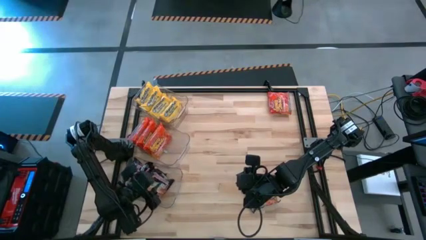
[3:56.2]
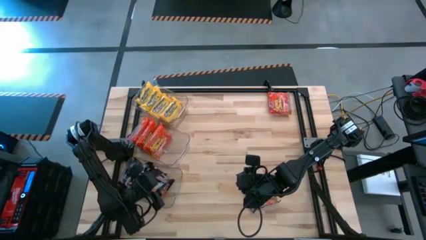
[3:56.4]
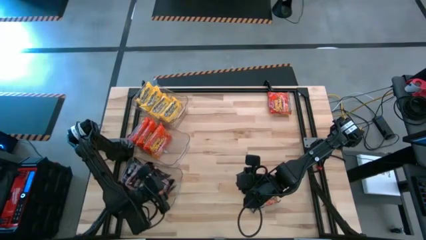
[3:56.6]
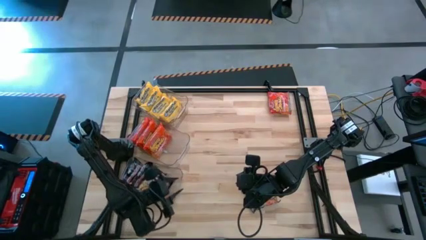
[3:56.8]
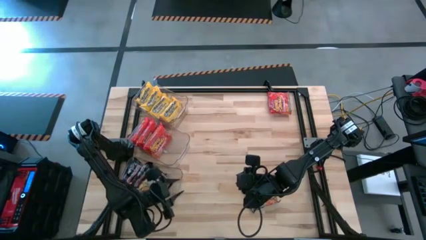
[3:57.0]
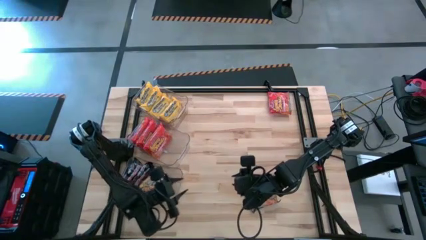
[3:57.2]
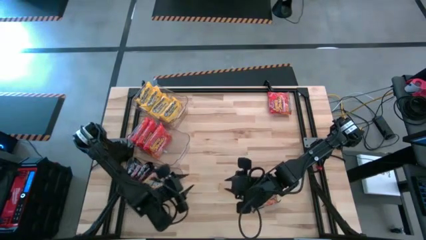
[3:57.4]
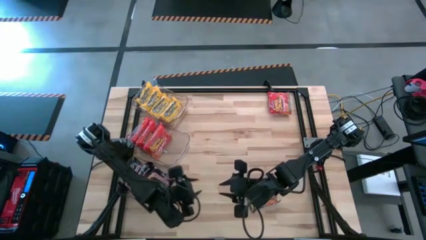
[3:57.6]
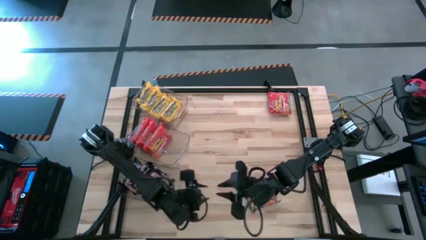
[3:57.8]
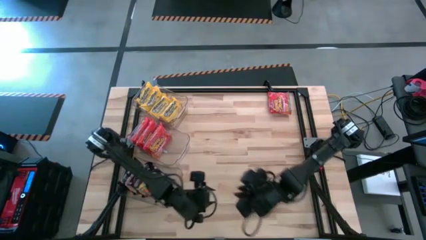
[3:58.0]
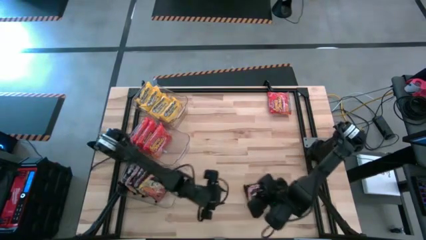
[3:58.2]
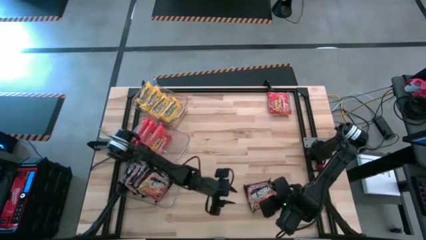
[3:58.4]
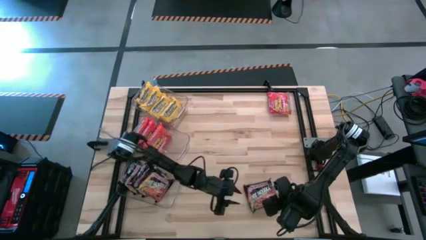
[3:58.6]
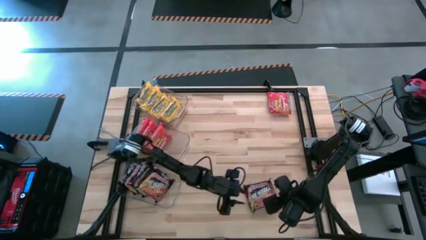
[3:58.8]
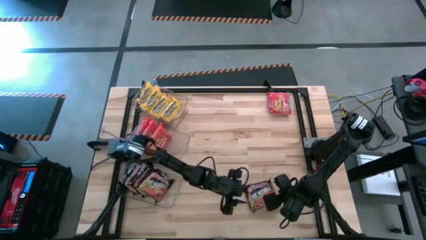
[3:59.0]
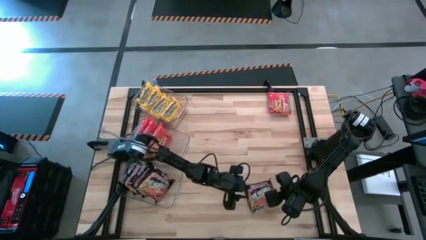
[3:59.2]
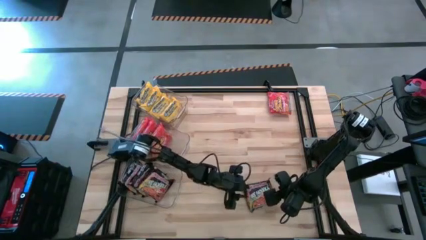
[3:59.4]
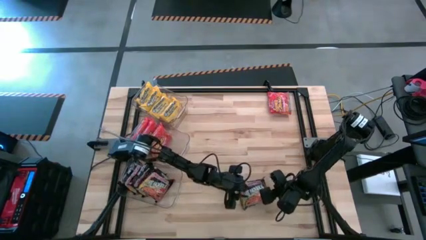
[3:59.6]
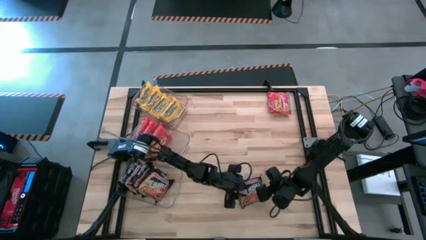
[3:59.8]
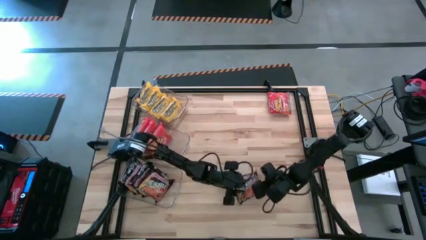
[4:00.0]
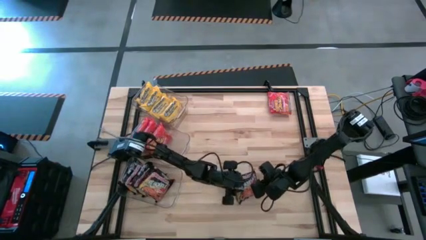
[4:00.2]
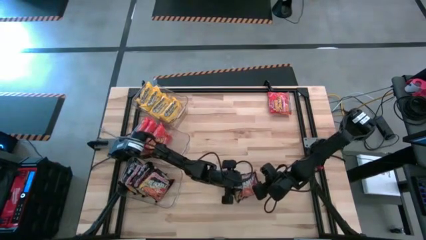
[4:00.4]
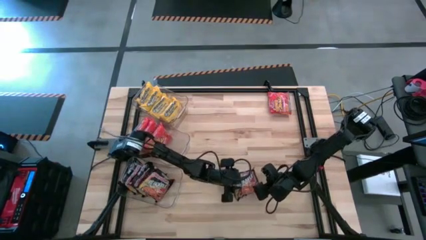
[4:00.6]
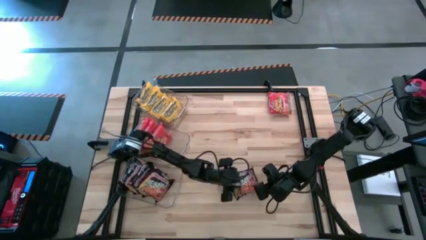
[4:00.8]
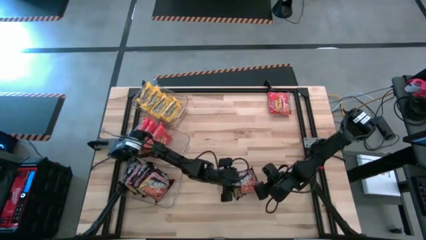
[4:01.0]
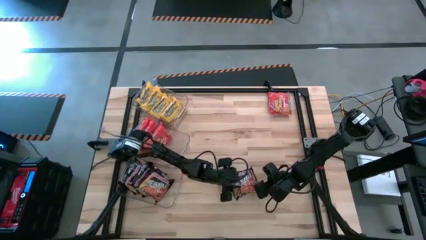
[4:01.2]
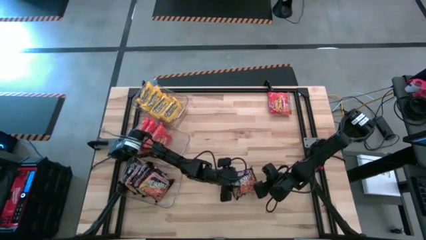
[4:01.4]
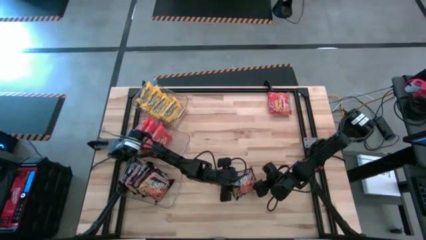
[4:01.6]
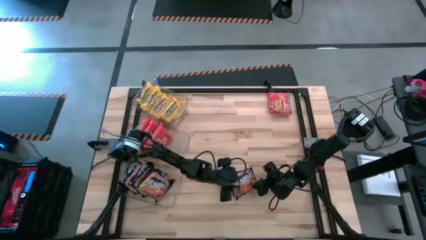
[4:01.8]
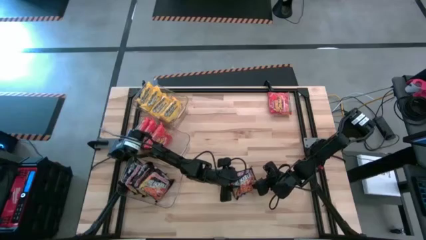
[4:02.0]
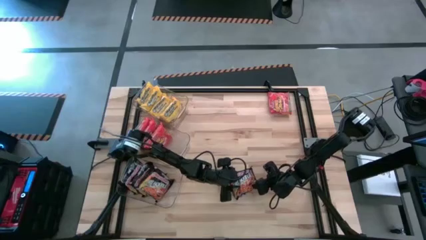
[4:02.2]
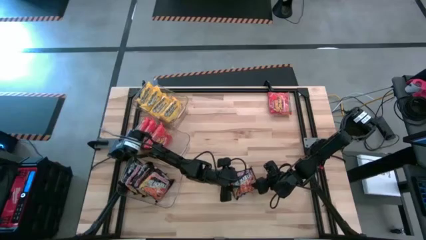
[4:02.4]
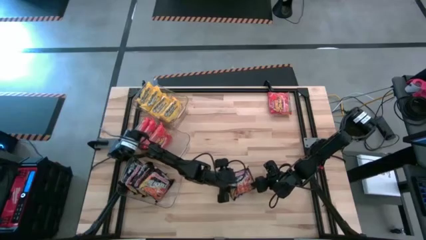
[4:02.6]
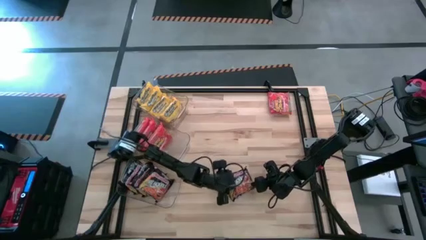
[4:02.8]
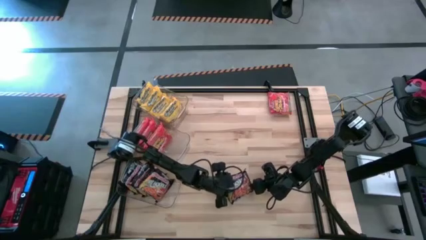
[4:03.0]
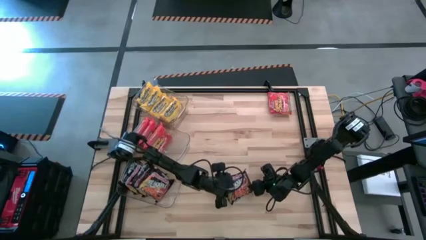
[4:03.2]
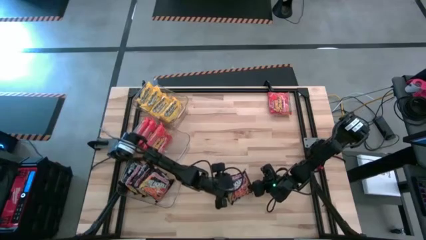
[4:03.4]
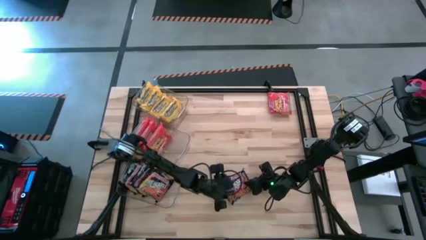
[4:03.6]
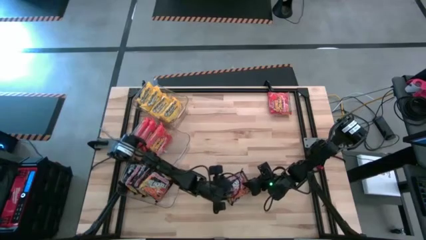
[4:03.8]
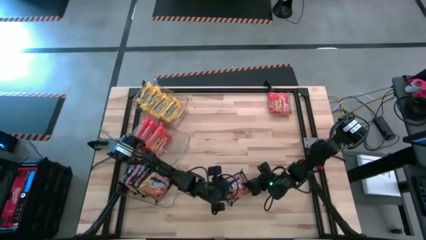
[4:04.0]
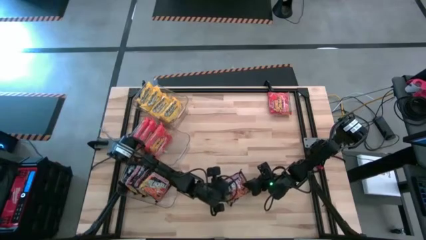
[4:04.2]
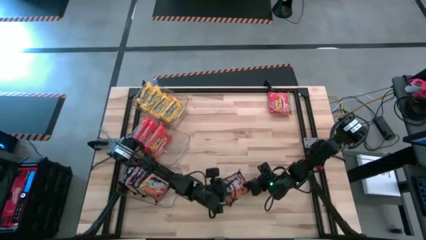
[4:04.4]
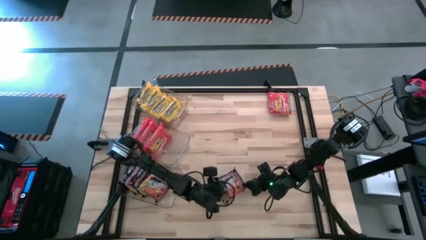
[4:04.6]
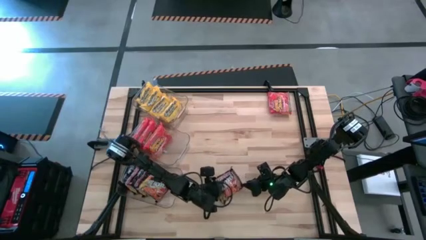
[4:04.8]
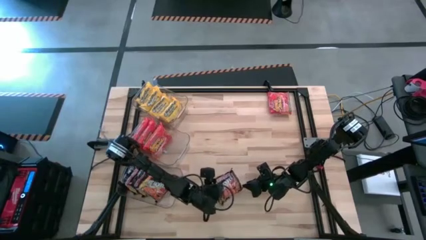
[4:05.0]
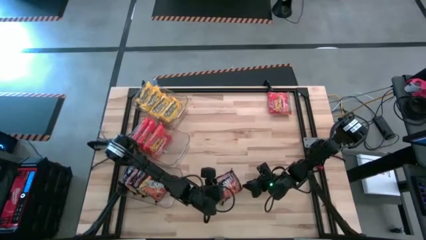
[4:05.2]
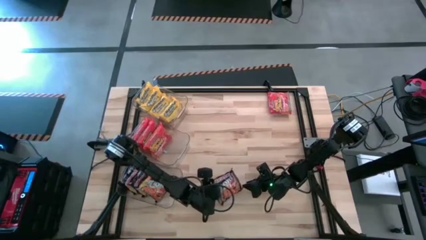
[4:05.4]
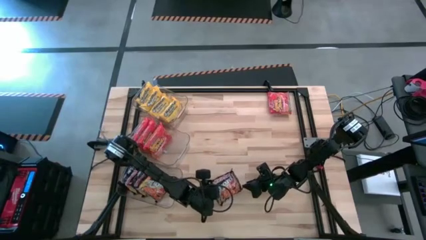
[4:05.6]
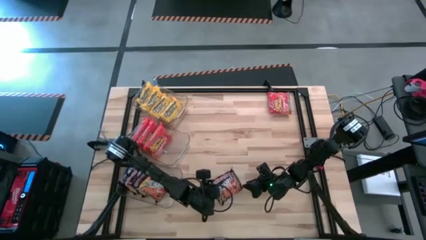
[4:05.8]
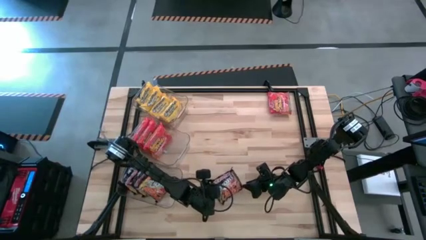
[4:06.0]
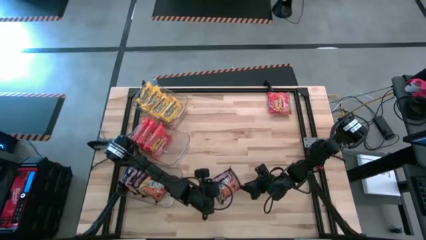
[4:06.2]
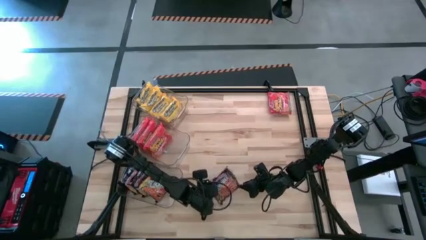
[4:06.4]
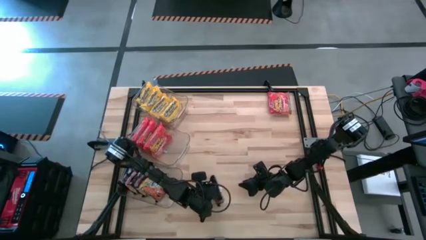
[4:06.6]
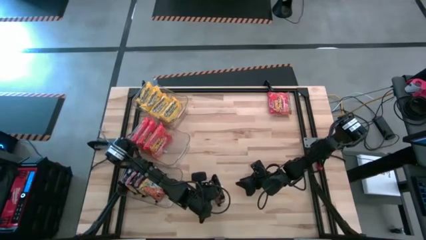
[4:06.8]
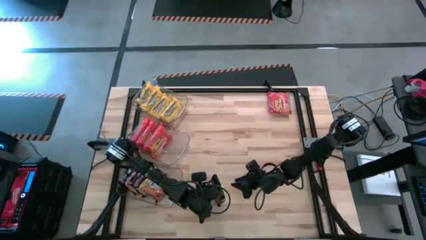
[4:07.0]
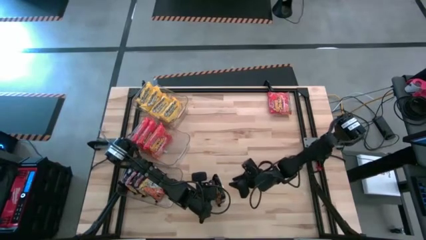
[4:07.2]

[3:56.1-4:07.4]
Task: Sort Maruchan noodles
Put the black noodles pack into the bottom transparent bin
